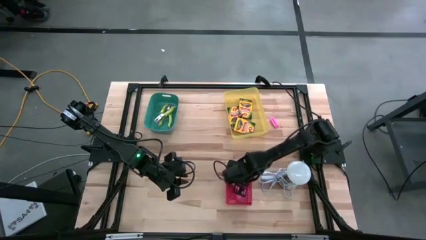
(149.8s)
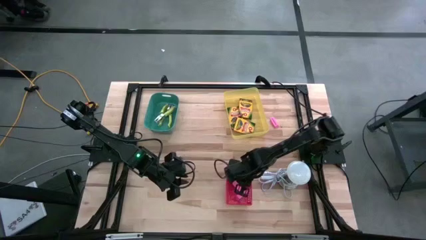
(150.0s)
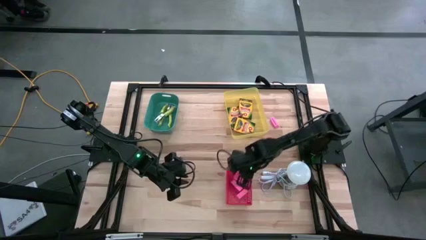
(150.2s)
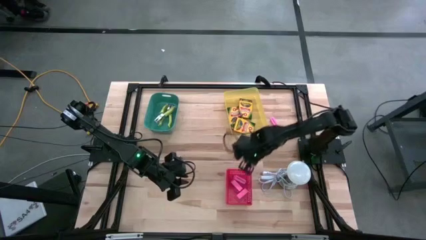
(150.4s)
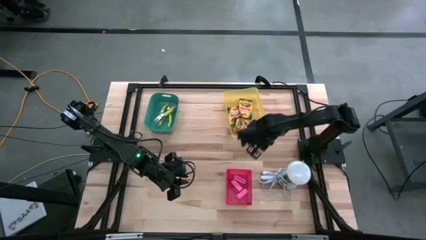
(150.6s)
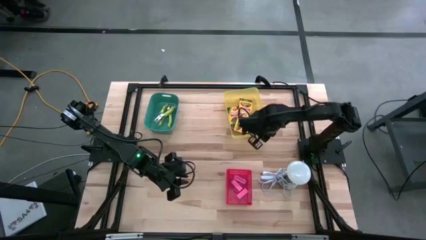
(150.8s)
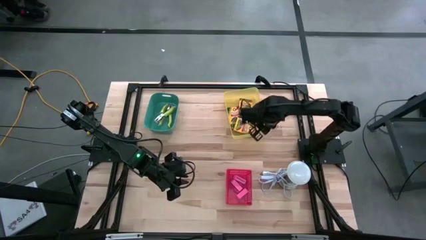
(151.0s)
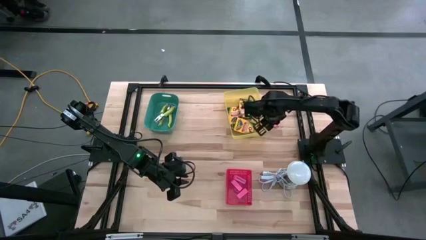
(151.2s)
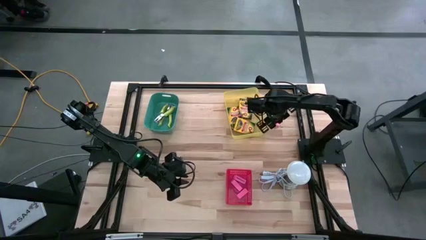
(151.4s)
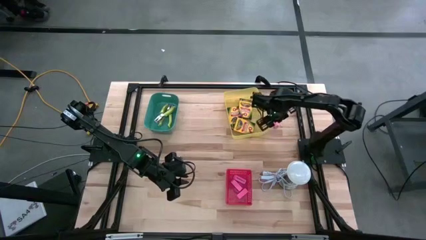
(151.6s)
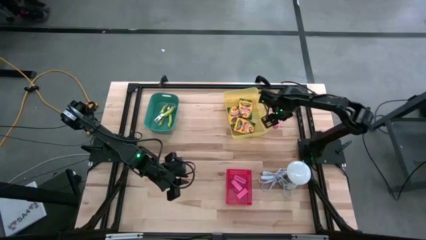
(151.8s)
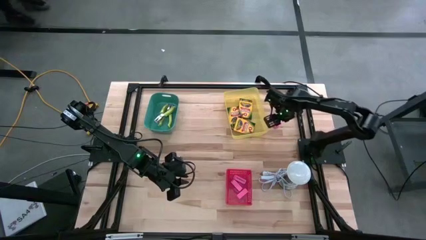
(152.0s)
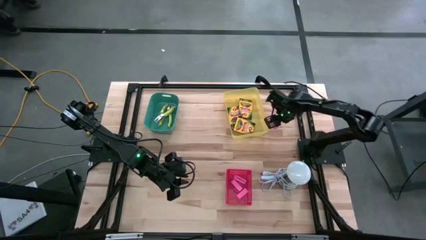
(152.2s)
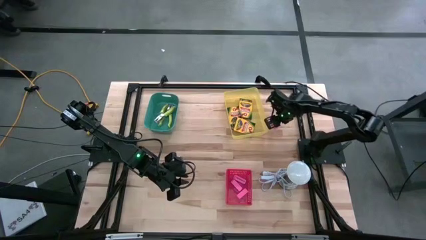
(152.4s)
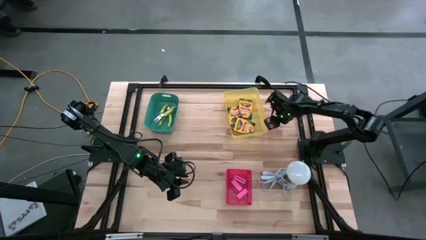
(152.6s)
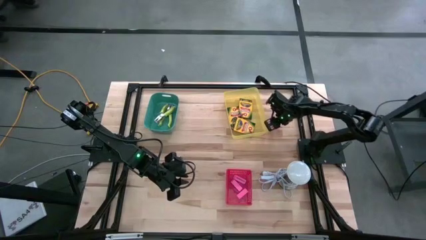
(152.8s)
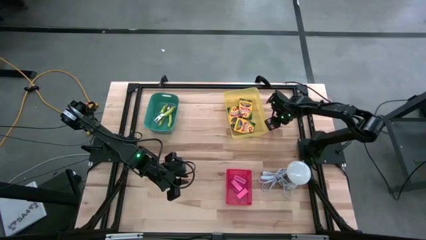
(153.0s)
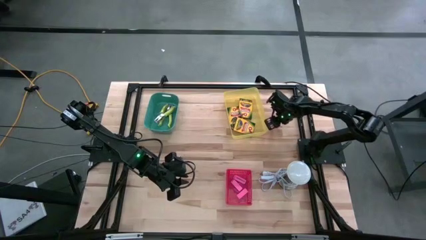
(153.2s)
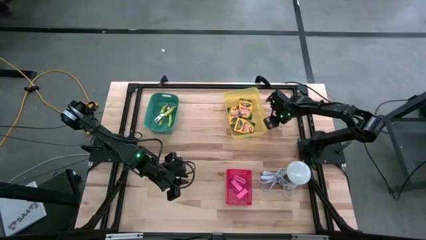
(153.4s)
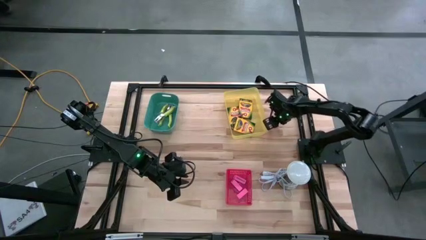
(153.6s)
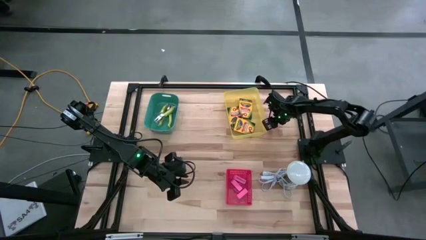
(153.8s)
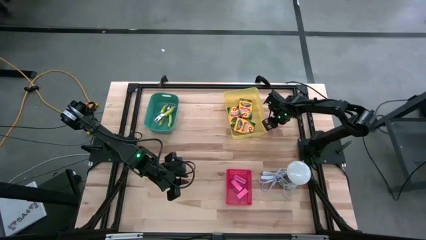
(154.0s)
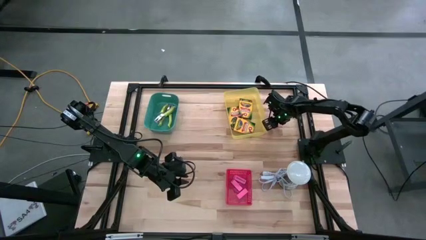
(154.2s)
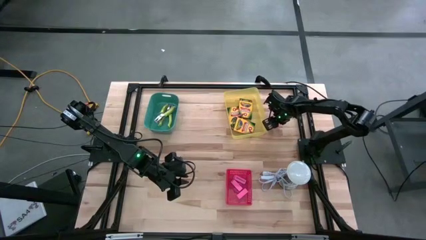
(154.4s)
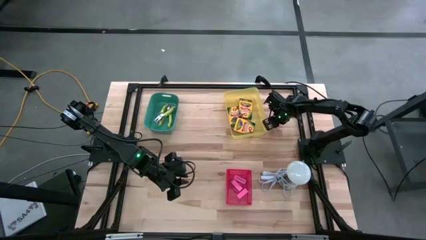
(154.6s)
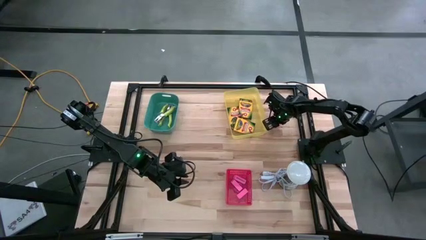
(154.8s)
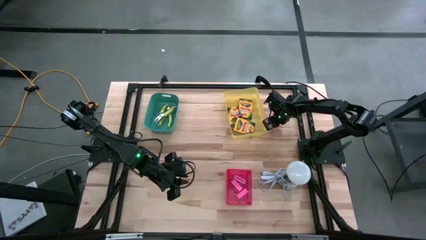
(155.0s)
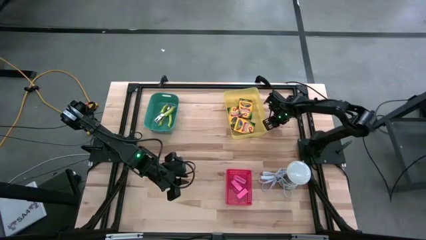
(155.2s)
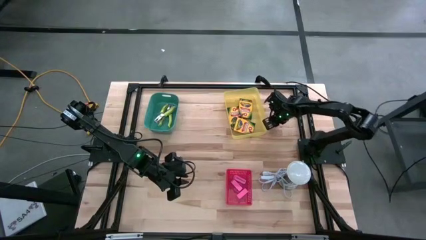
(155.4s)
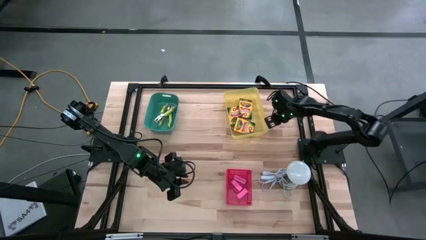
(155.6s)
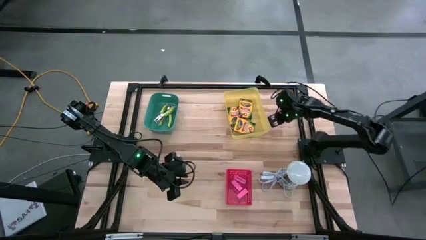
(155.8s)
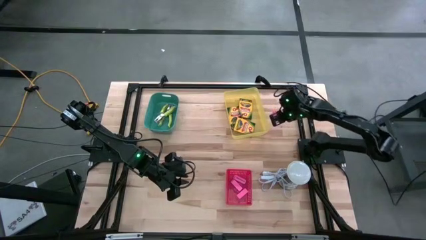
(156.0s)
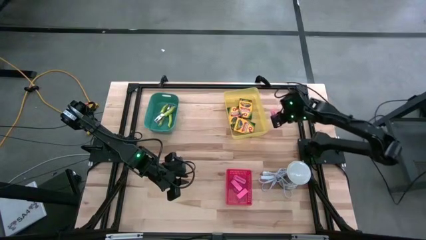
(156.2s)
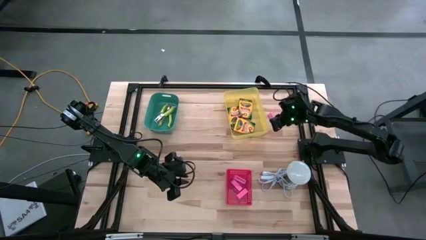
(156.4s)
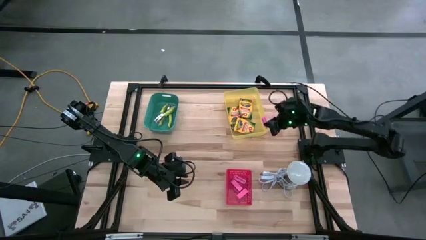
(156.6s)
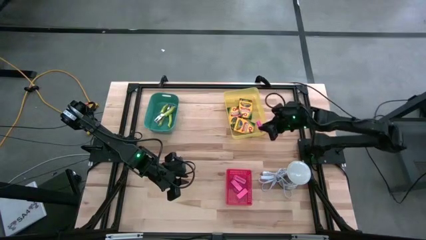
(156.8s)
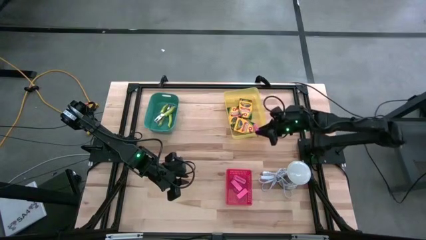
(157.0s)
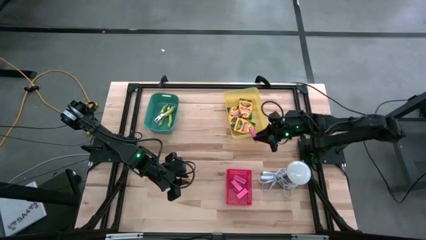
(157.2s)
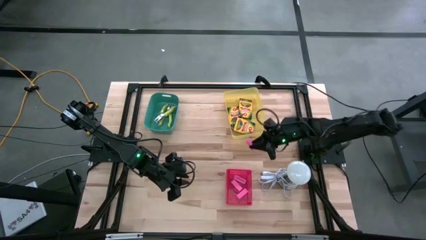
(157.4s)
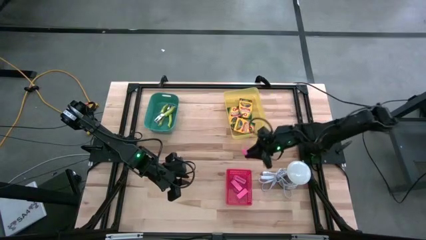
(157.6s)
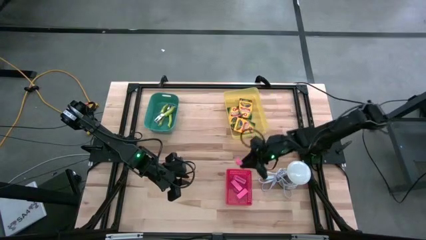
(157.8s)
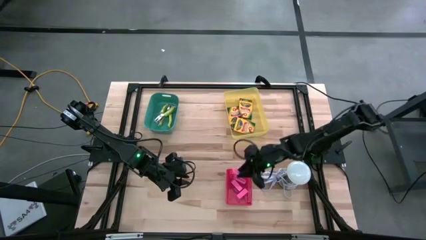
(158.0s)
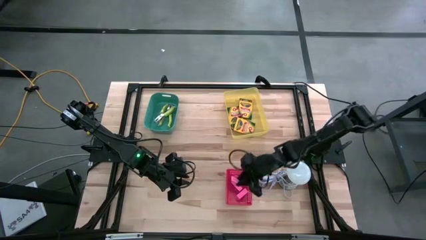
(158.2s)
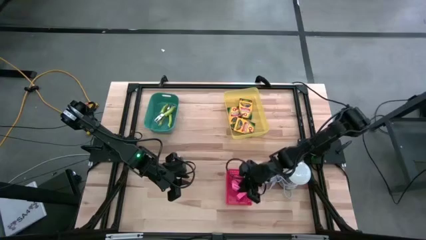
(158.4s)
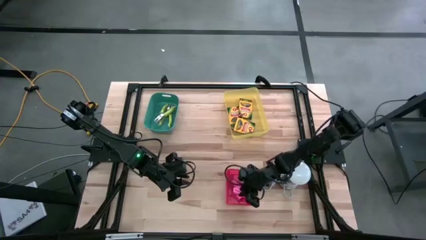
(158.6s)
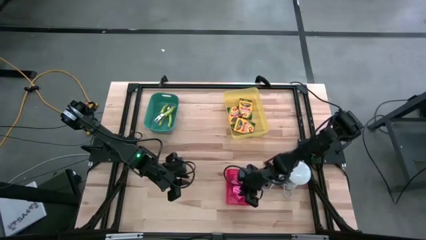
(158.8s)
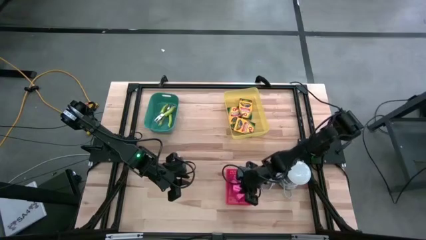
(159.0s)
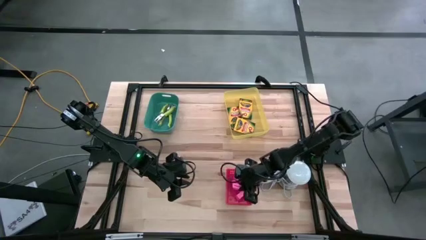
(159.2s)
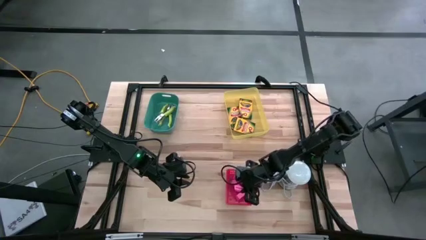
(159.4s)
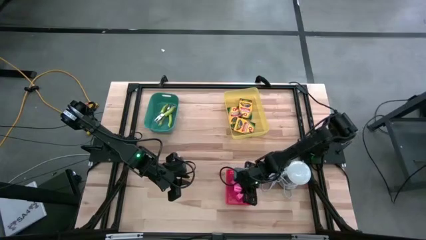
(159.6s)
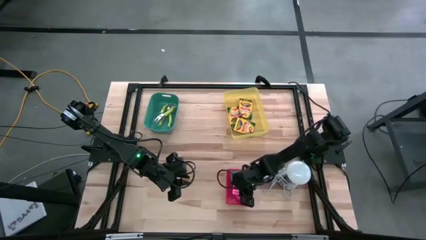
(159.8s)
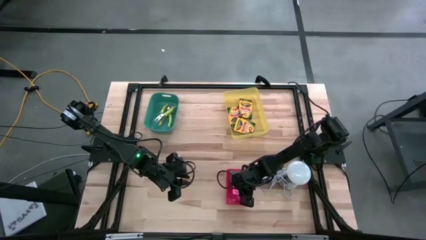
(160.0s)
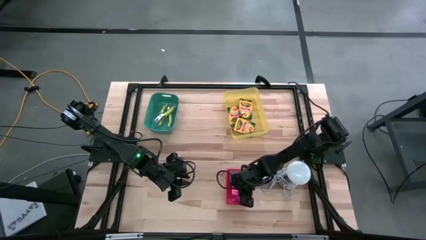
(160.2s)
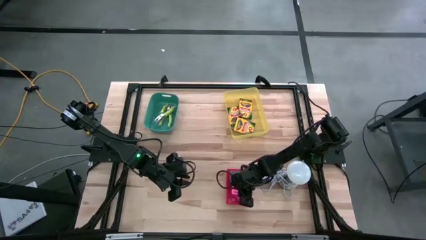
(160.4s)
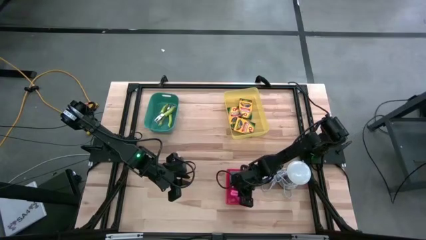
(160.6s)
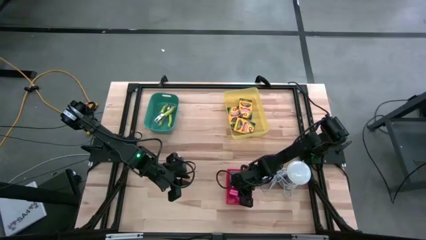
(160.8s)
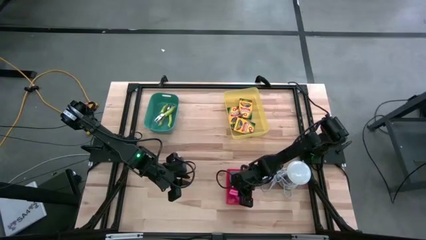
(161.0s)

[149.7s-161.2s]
Task: Pick & Place School Supplies
Put the pink eraser into the red bin
